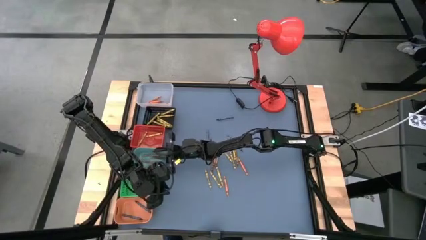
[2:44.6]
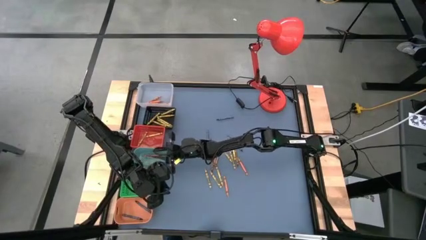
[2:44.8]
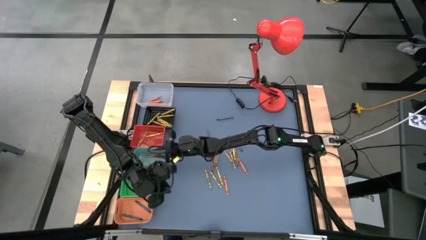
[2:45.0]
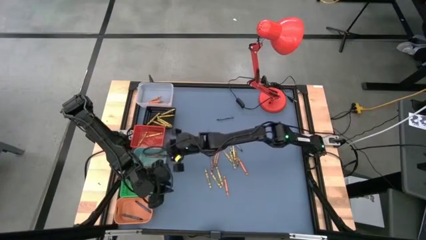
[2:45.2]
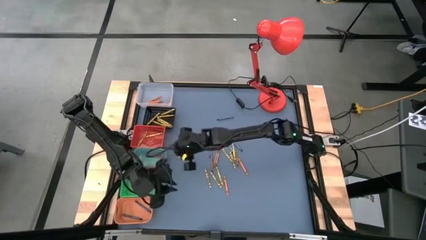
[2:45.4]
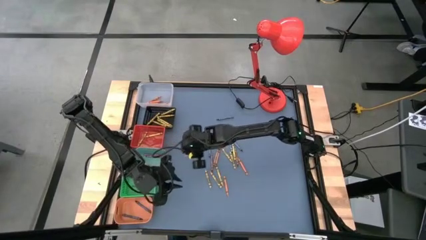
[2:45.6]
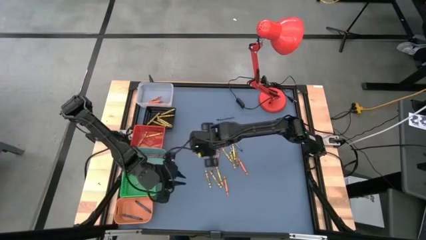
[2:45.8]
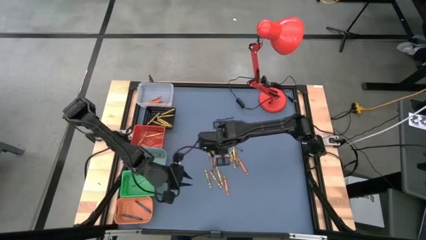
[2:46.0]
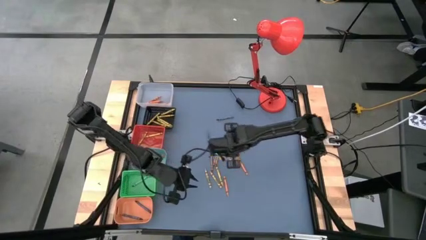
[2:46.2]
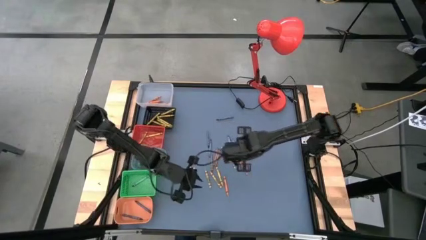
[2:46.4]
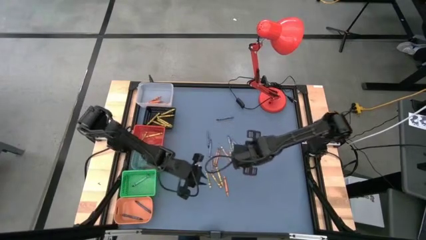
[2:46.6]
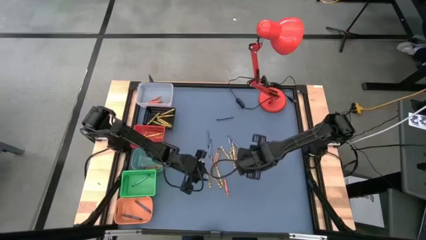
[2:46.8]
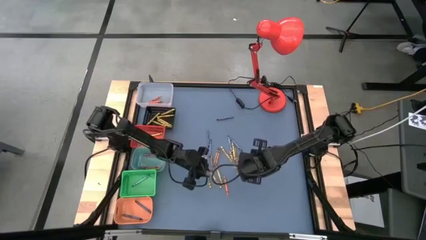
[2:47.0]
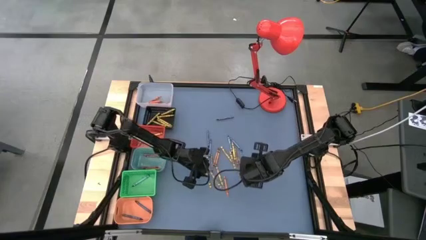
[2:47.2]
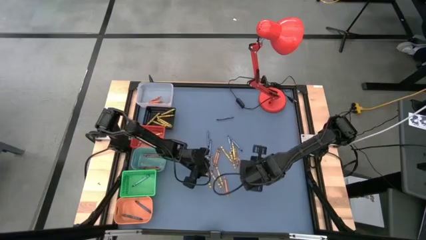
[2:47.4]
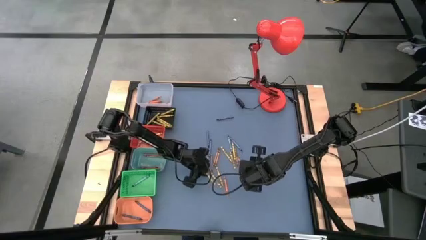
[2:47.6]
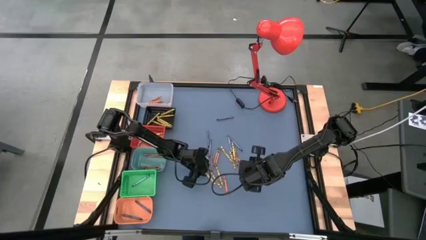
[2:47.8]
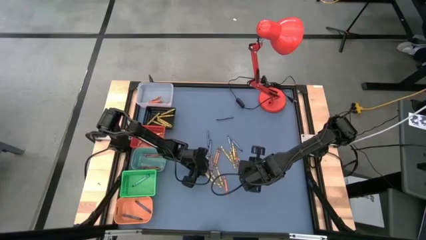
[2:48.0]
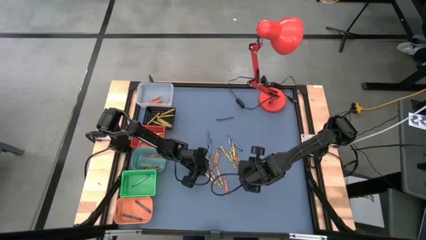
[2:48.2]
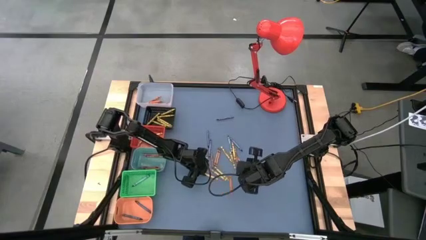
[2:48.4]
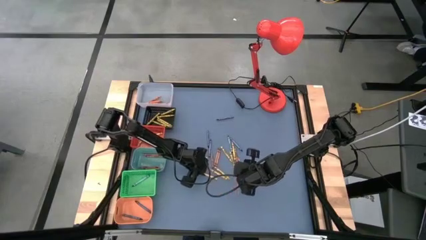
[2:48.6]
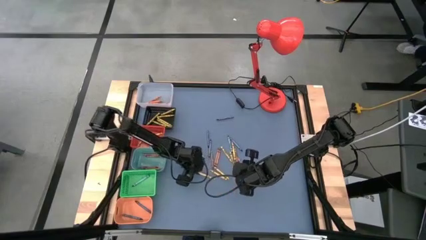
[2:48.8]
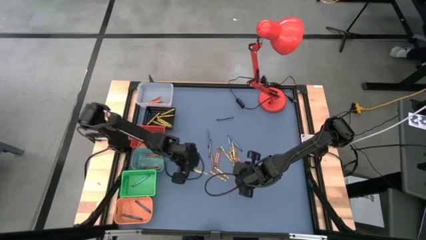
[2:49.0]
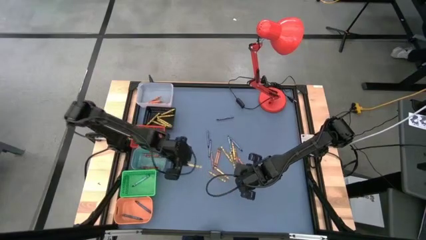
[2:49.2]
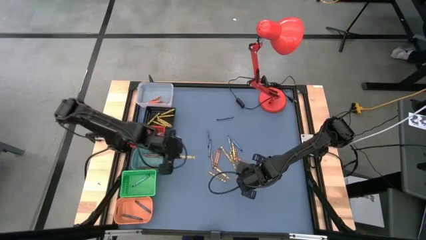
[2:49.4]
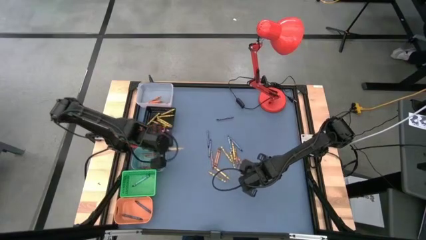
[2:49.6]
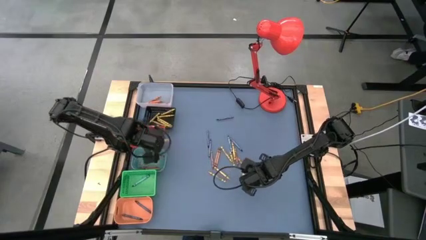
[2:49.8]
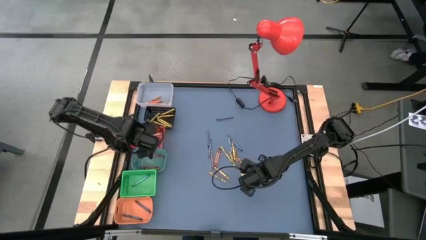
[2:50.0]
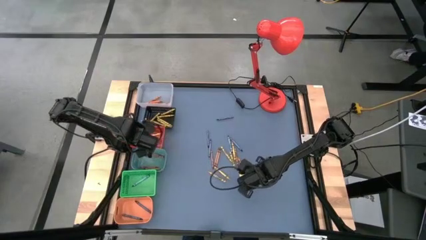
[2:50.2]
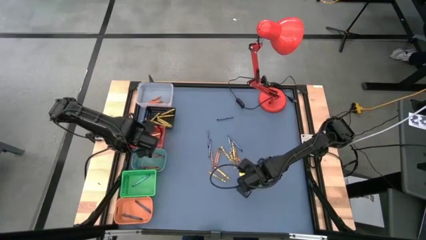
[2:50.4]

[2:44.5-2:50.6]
Task: Sort crayons
Put the yellow crayon into the orange bin

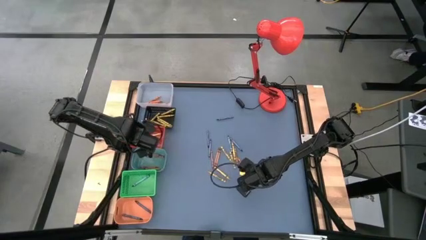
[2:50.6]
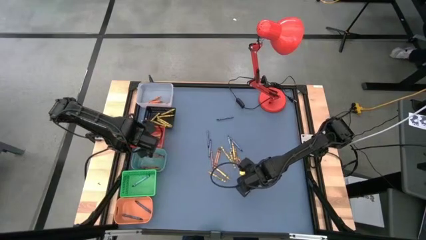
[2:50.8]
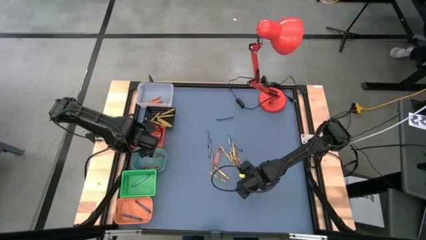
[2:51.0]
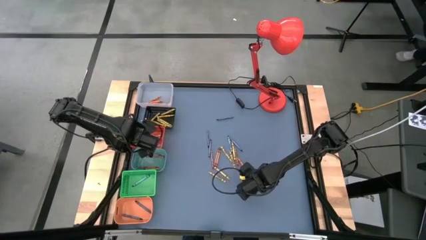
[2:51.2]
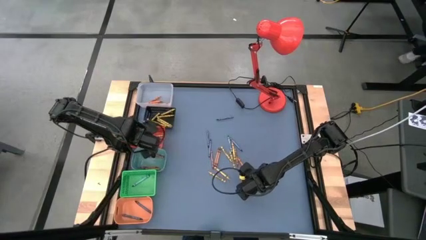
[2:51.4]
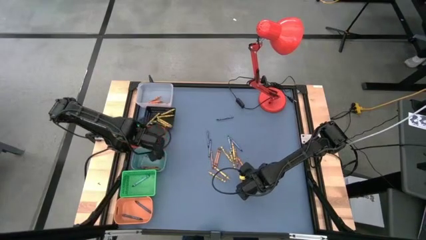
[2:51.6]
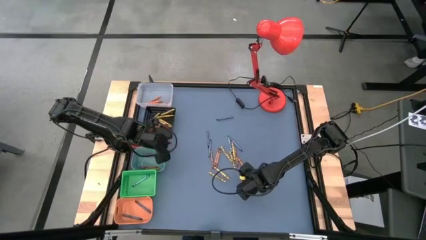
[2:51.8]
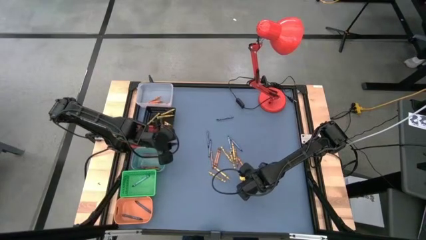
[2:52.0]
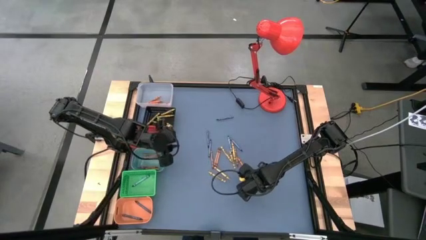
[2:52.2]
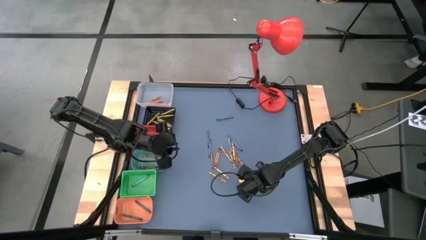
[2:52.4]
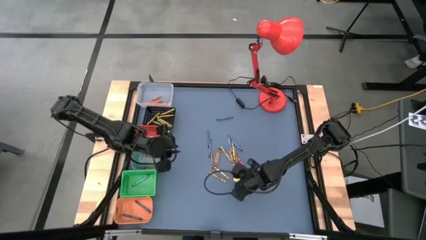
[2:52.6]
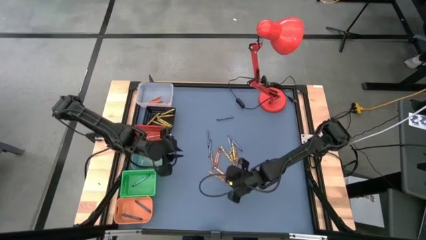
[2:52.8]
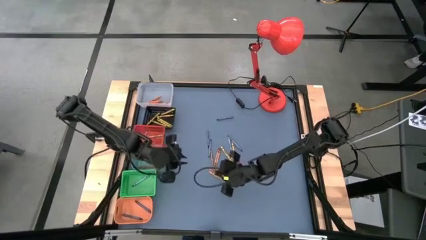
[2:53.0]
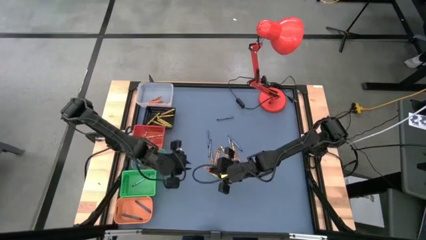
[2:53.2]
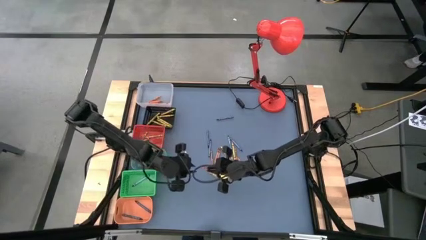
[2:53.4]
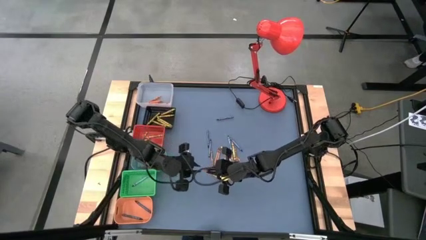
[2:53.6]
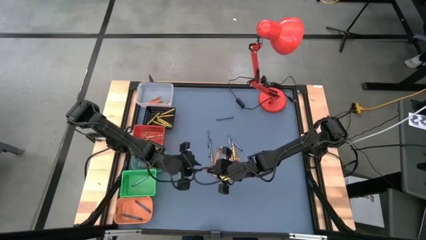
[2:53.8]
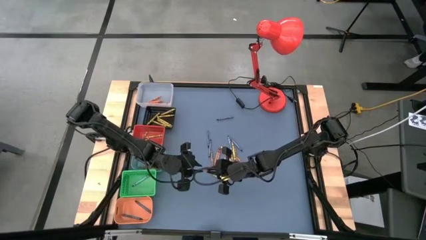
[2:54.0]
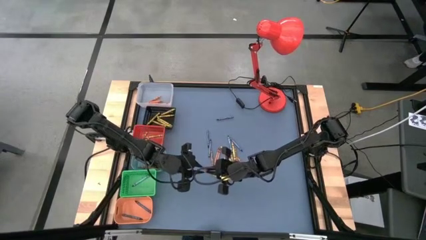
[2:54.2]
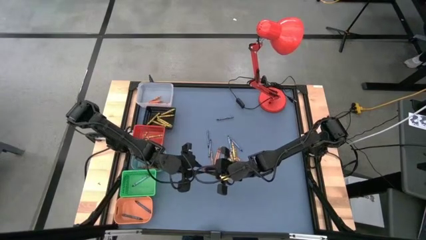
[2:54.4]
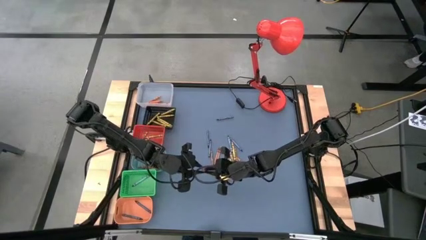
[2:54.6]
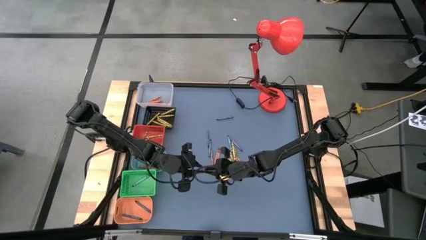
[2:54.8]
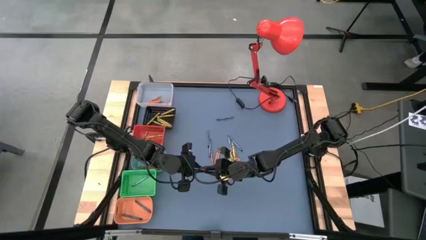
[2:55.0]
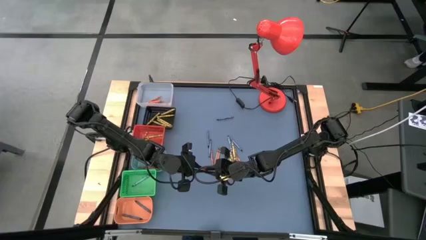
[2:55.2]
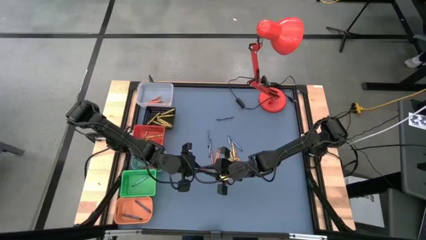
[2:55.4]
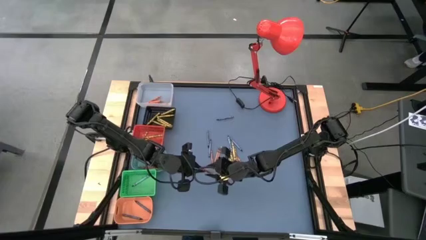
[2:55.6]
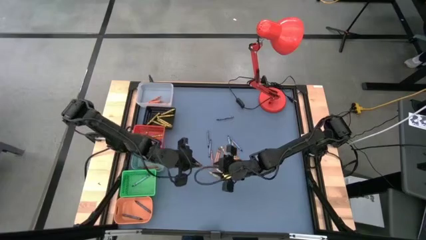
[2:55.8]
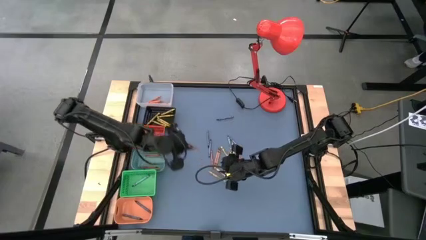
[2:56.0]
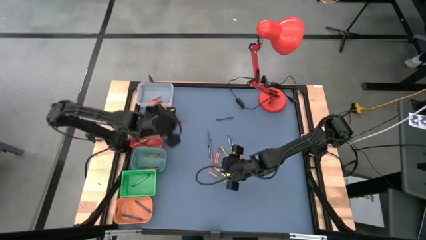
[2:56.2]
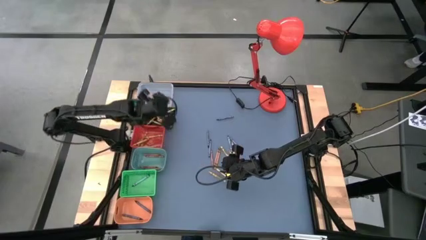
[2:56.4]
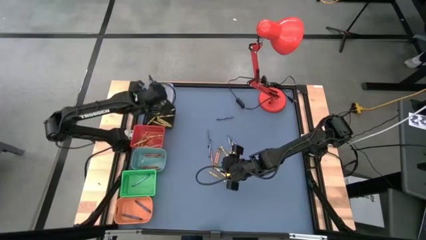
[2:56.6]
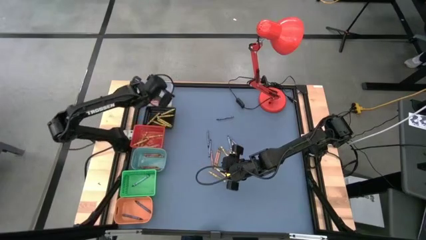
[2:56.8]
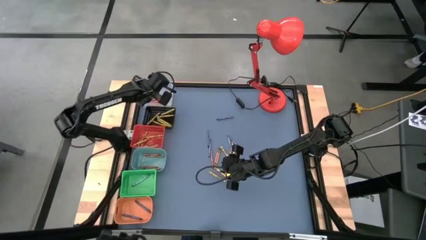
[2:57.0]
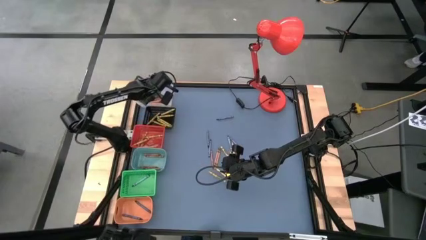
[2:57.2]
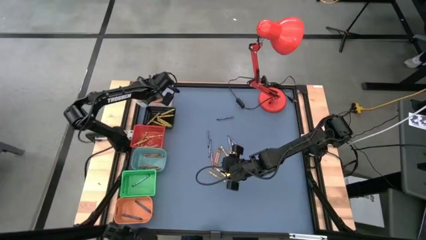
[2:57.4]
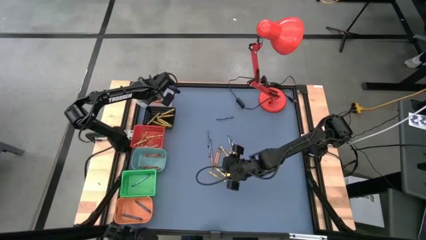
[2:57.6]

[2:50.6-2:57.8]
Put the orange crayon into the transparent bin

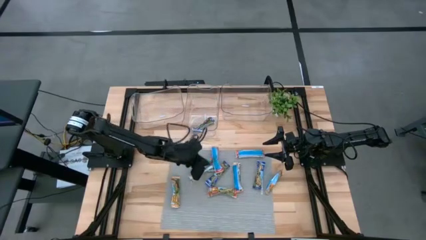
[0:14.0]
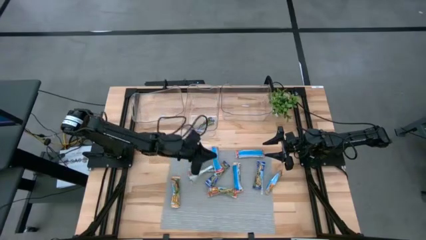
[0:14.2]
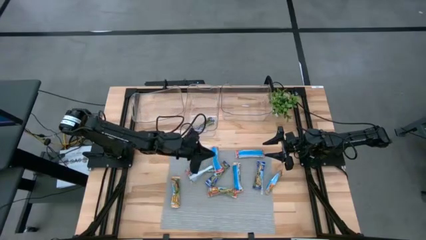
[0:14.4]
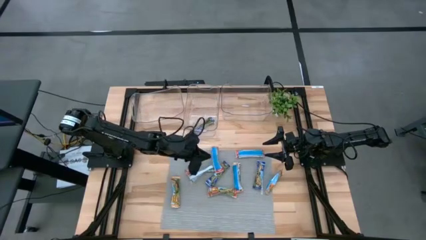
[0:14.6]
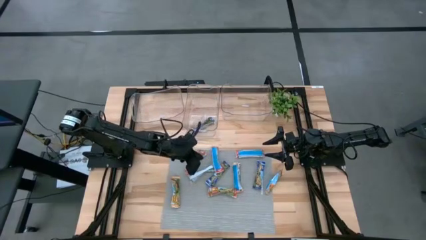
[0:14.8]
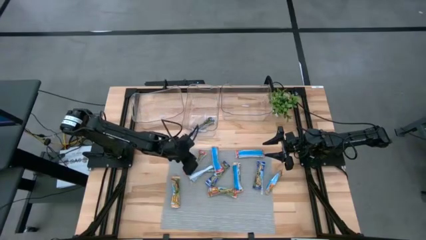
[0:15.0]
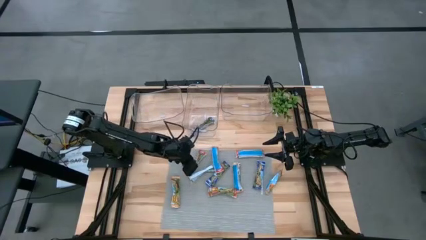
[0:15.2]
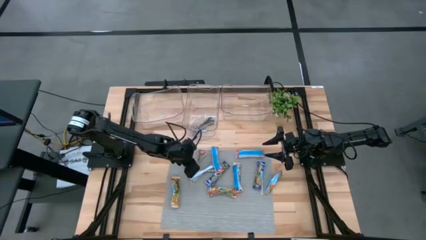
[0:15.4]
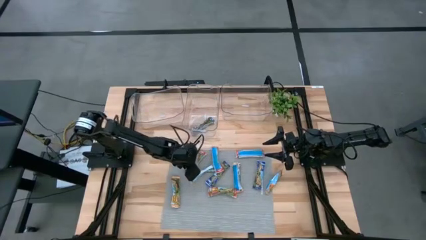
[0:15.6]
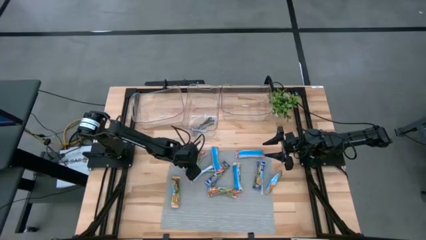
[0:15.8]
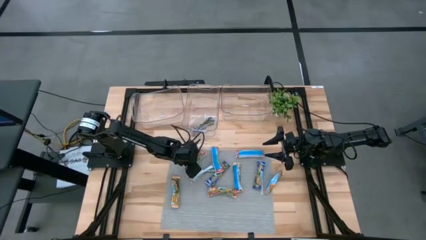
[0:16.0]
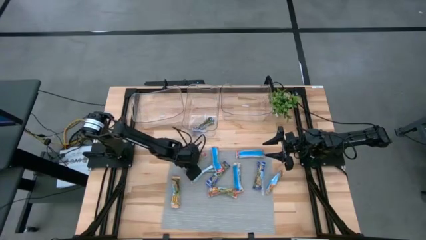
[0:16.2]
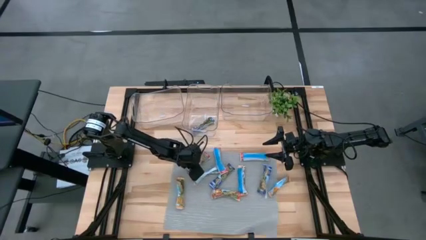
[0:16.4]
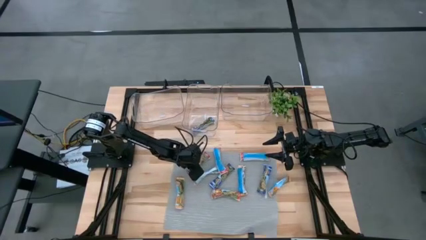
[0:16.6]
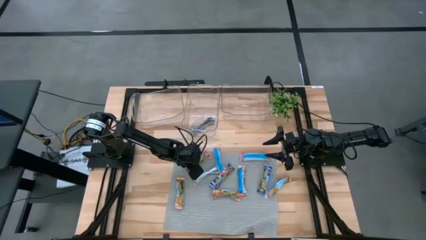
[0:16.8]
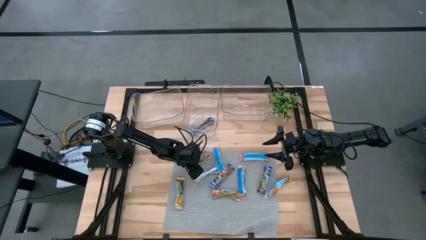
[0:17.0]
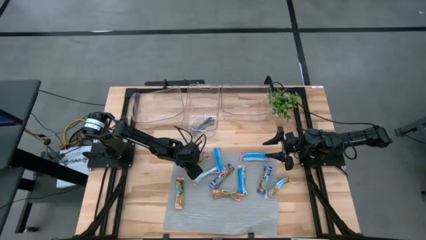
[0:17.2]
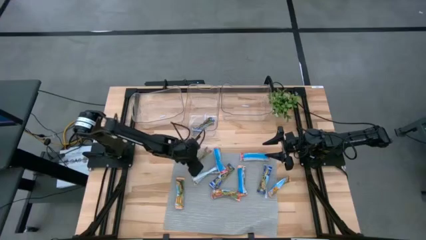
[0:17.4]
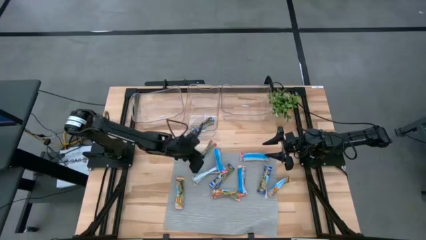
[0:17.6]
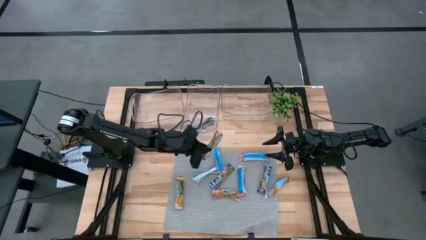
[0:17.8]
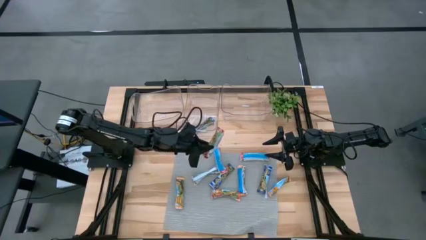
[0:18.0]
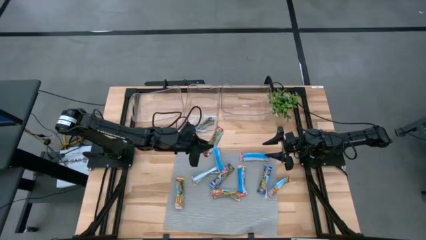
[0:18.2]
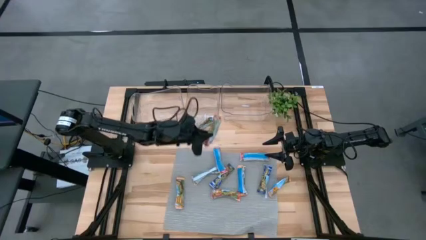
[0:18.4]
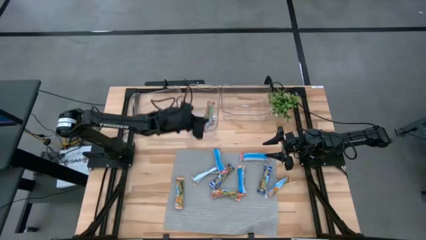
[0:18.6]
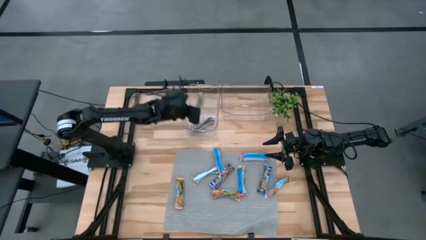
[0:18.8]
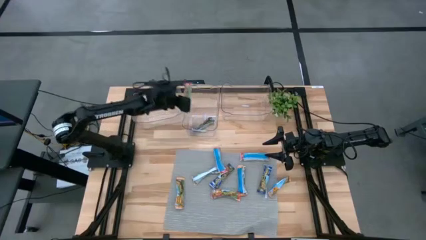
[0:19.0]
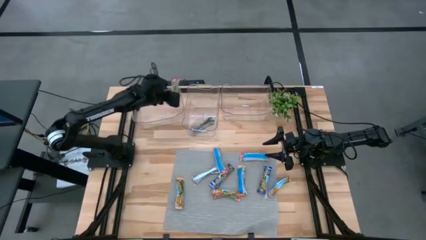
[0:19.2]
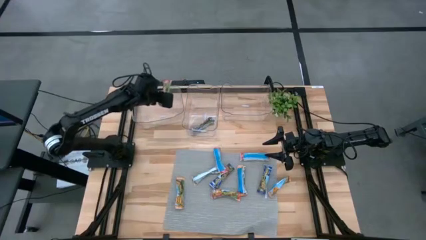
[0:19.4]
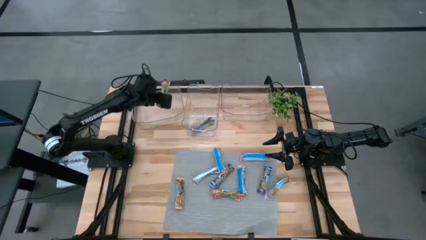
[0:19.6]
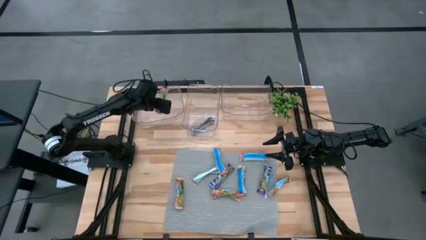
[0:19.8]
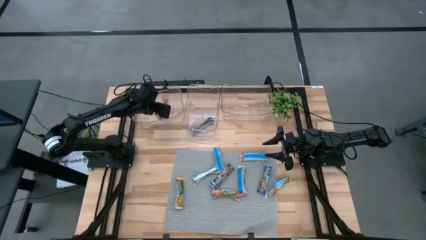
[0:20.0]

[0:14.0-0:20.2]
Task: Pick and place Granola Bars by type
Put the top left red granola bar into the left transparent bin
